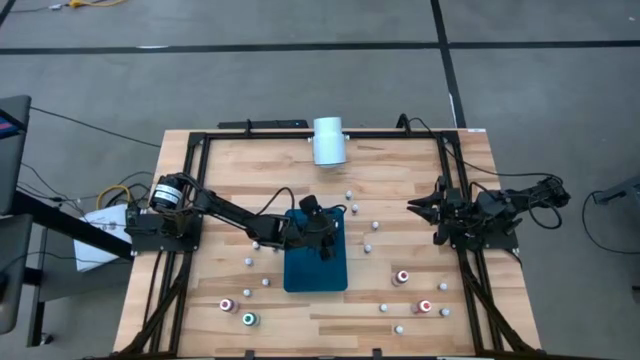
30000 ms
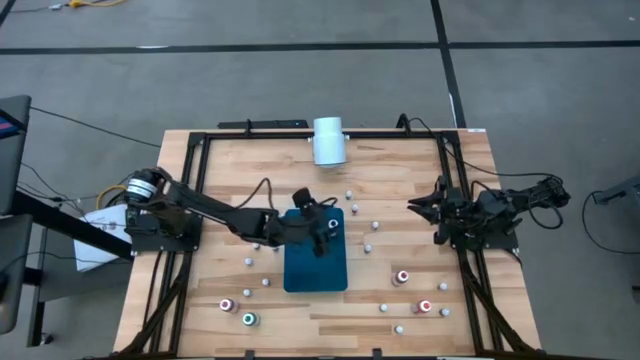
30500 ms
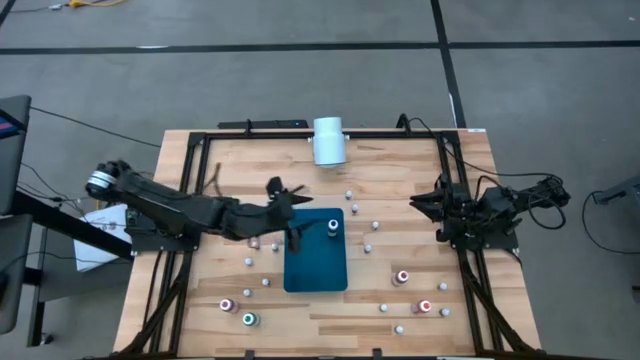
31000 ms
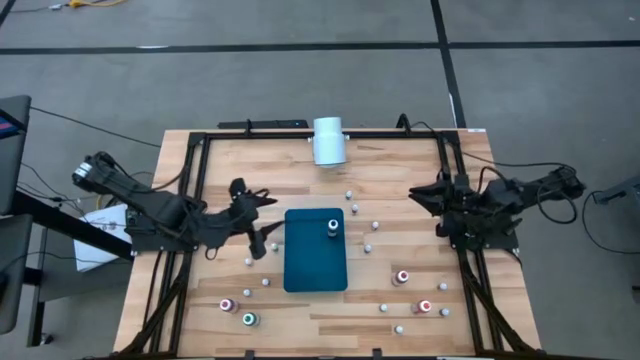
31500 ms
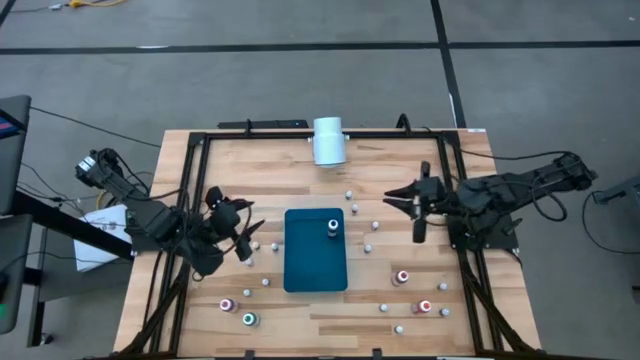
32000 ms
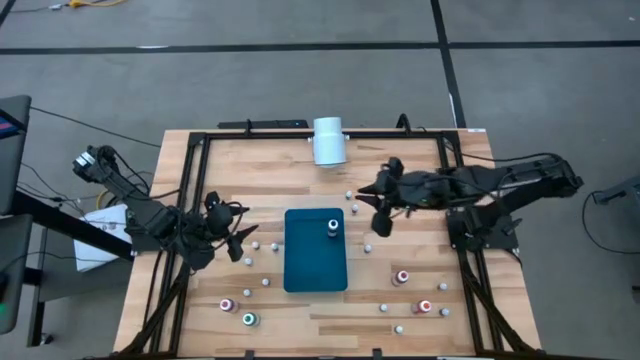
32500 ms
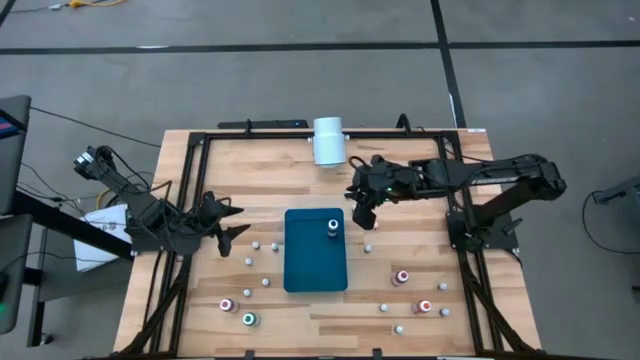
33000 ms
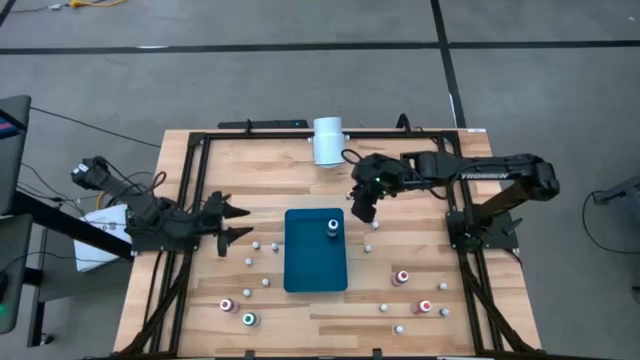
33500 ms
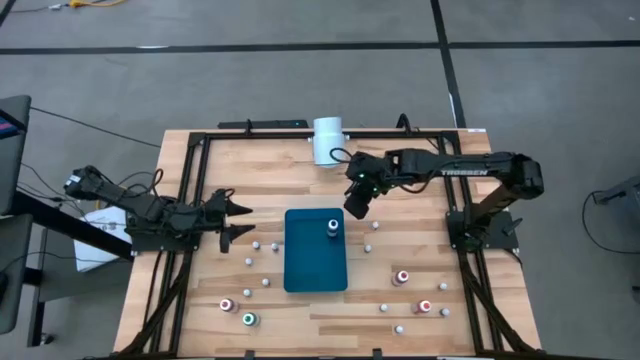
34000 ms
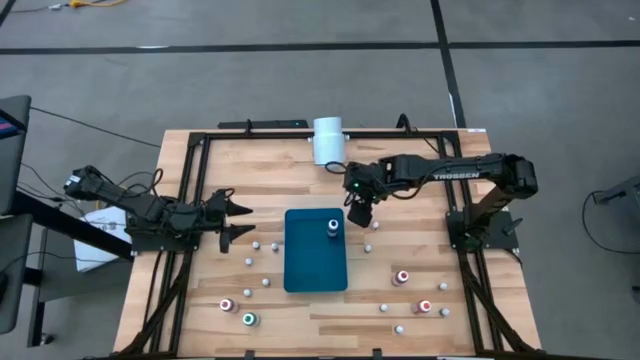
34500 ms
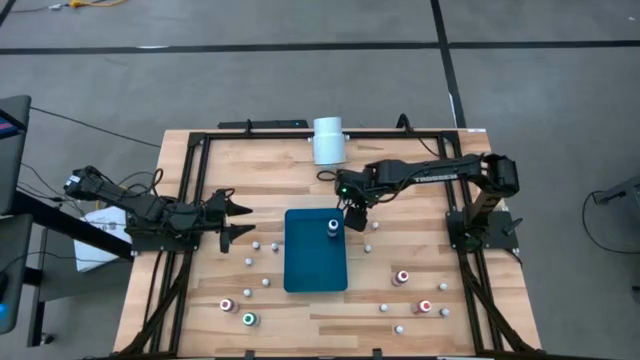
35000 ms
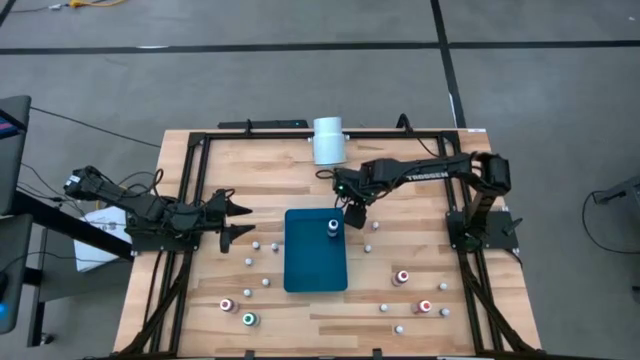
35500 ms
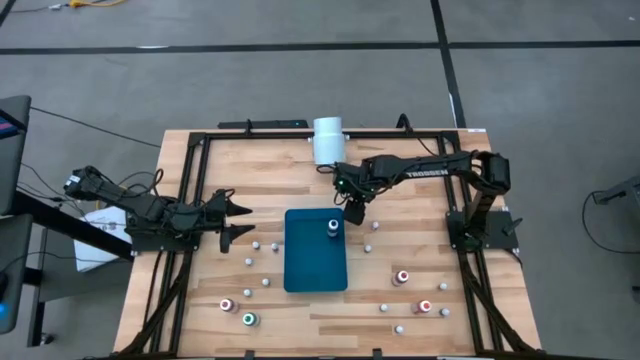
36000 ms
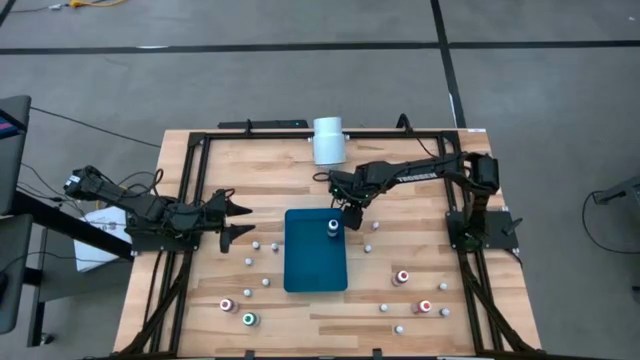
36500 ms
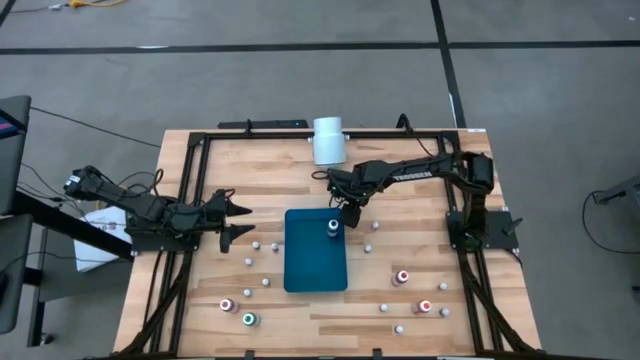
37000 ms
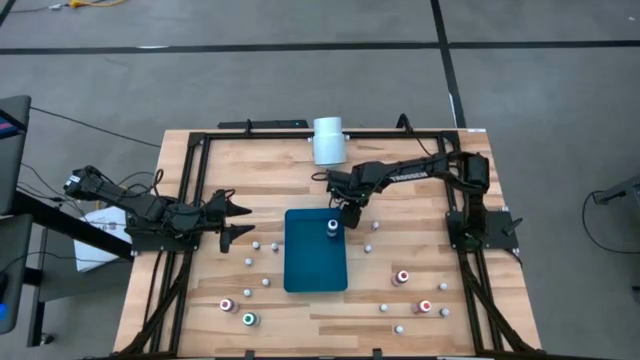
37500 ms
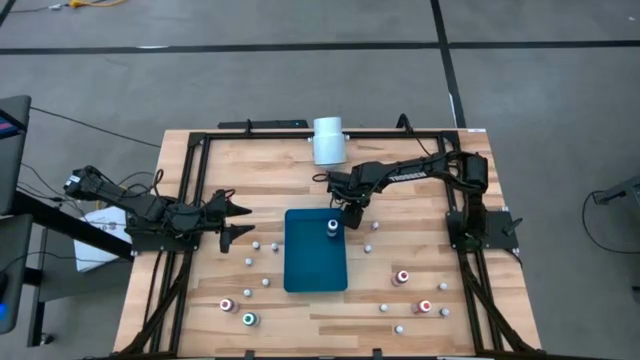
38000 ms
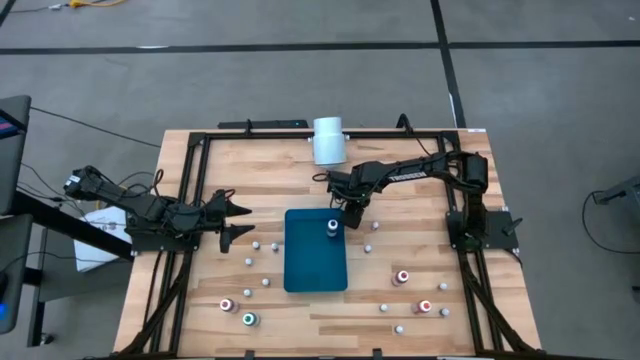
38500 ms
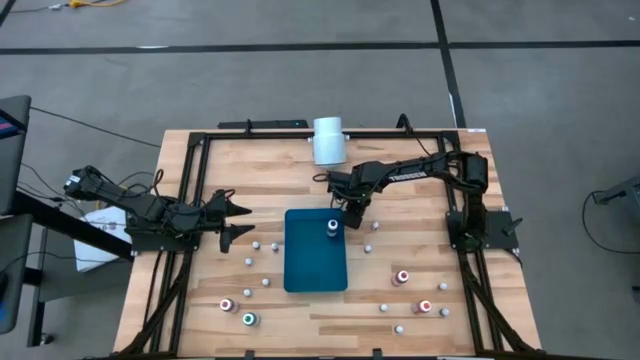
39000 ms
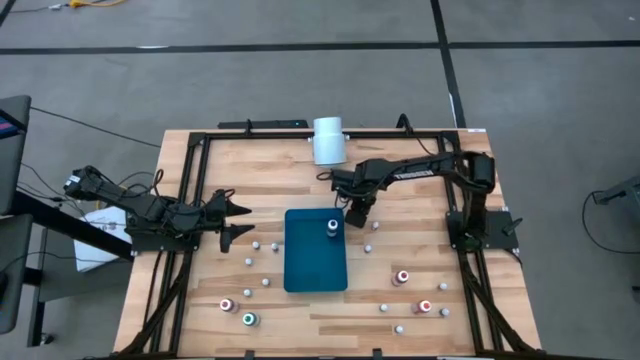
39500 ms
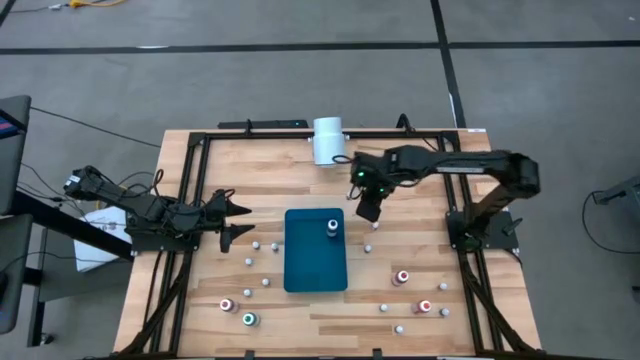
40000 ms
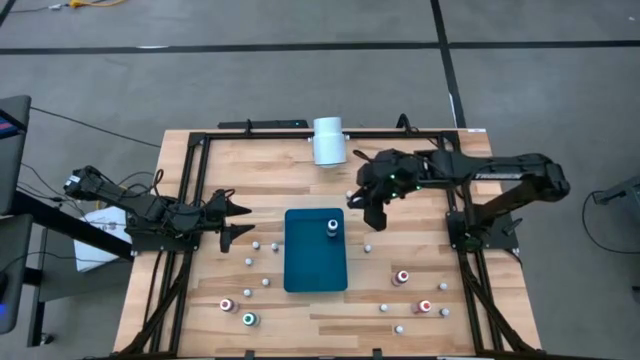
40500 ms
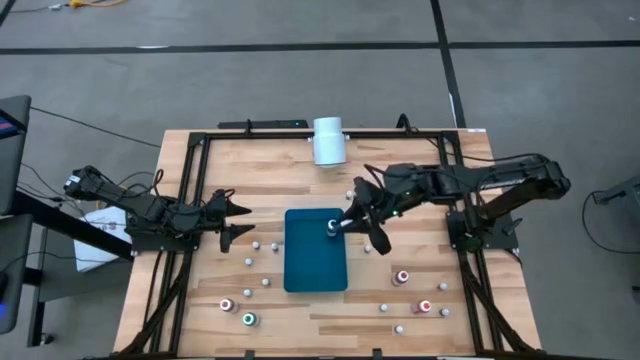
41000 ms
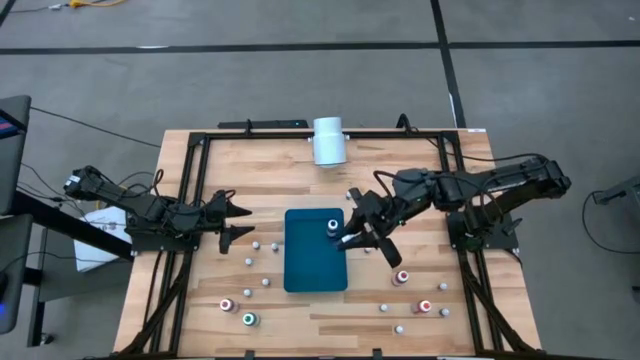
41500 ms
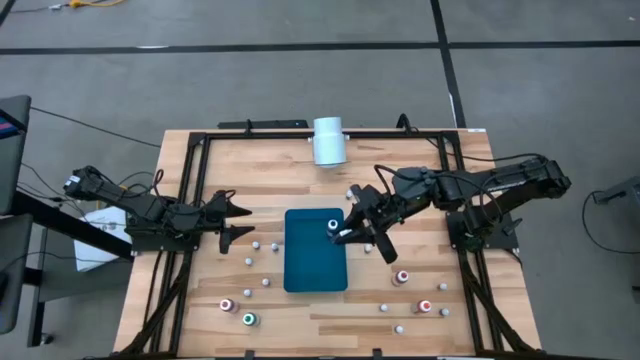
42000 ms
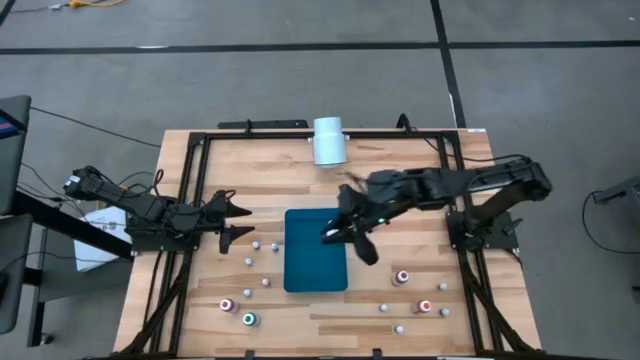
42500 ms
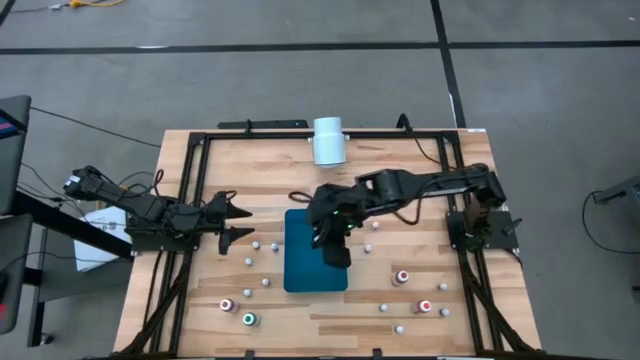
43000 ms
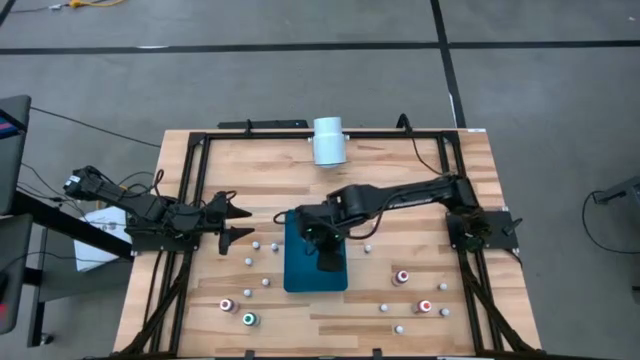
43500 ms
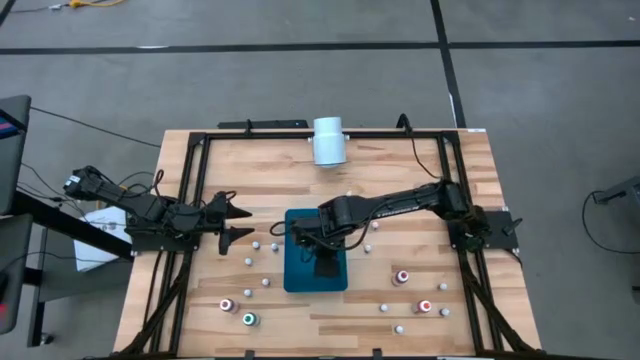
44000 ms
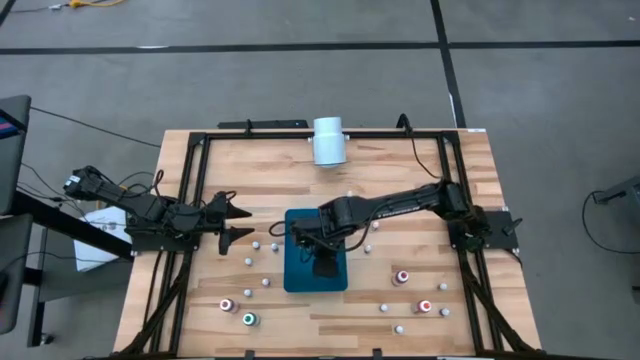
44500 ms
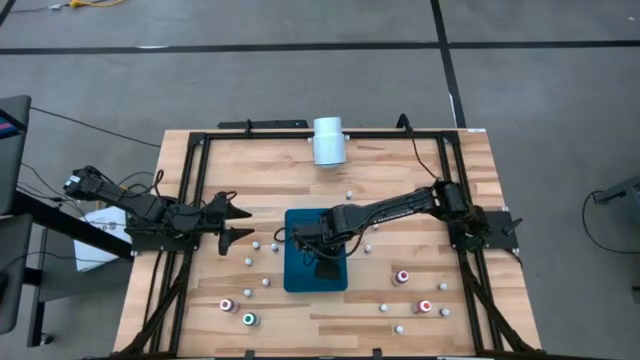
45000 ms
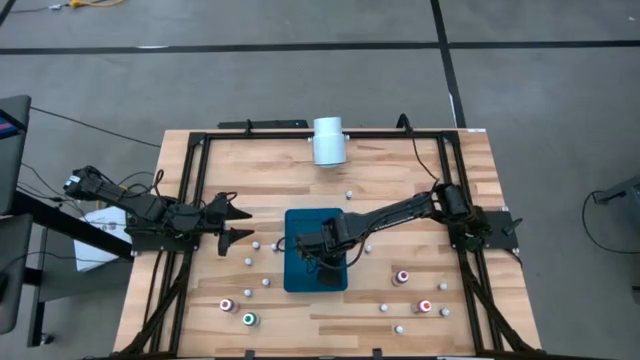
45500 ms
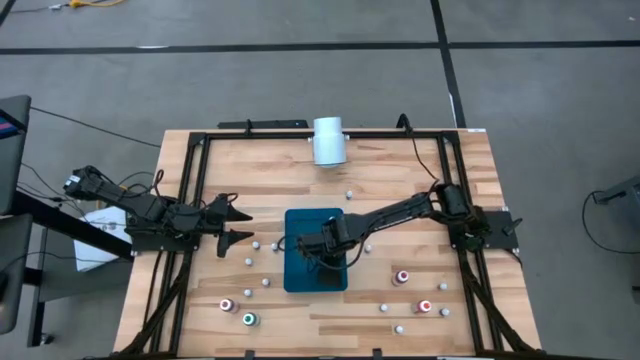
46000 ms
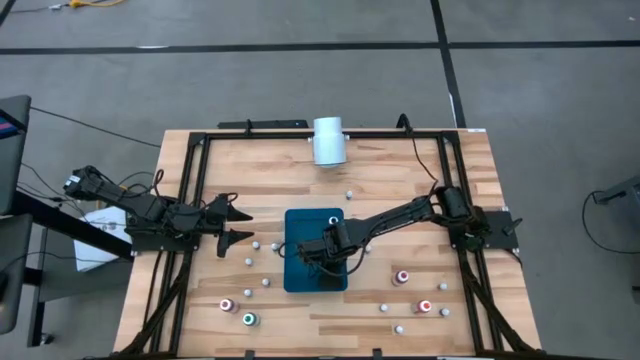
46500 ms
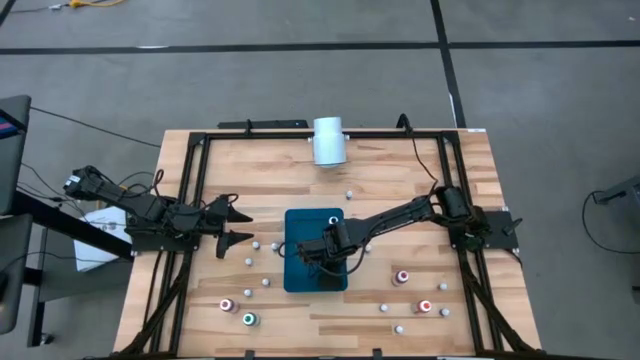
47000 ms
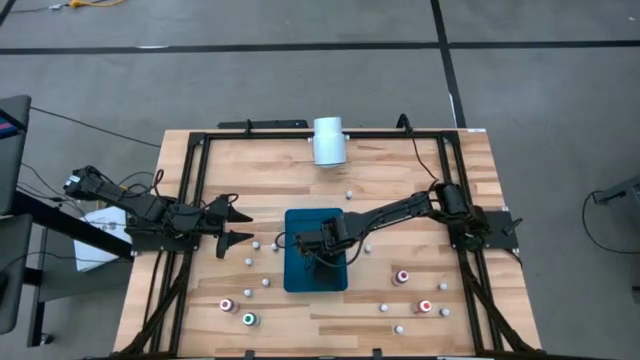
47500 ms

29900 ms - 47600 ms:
Task: Pick & Place food coloring
Put the top small purple food coloring bottle into the blue bin

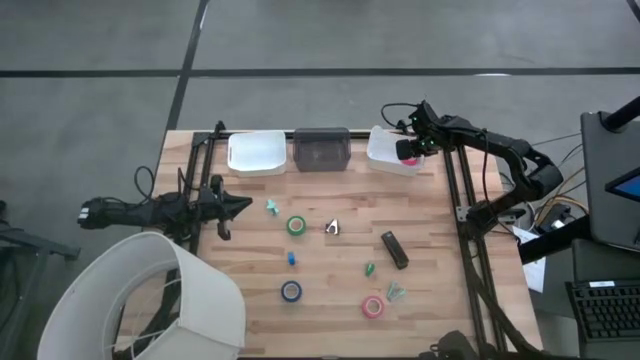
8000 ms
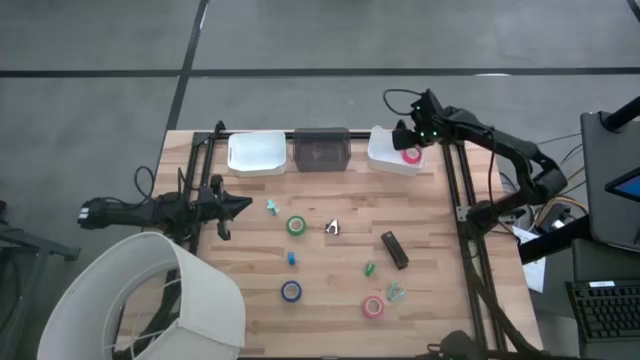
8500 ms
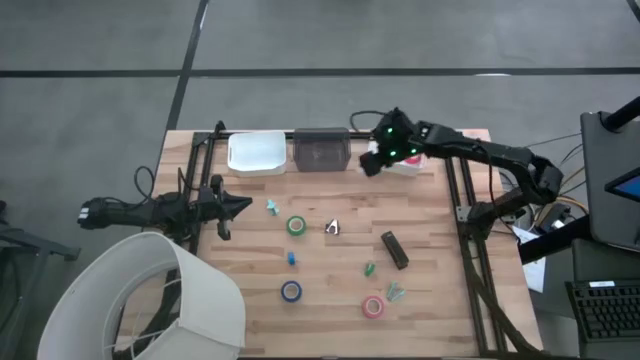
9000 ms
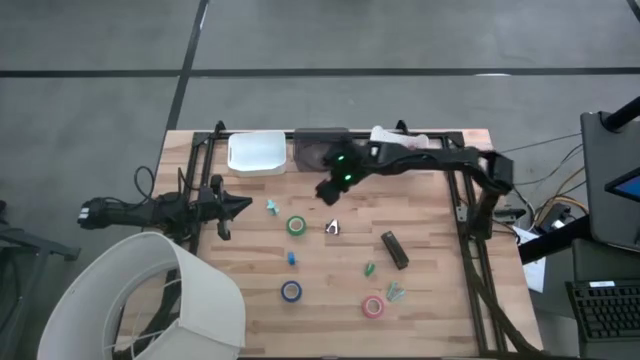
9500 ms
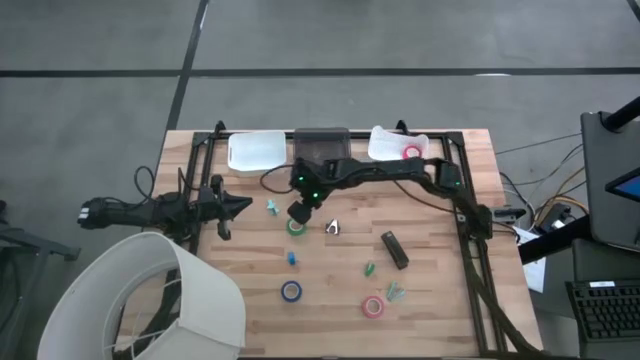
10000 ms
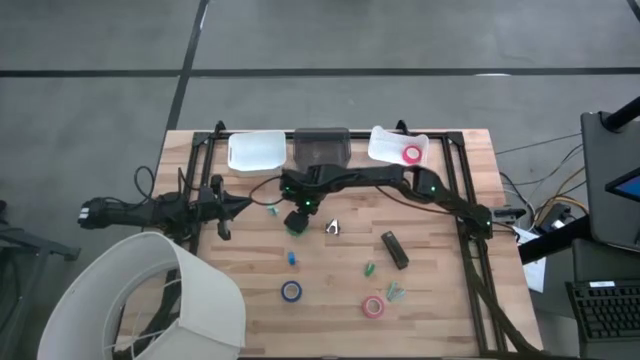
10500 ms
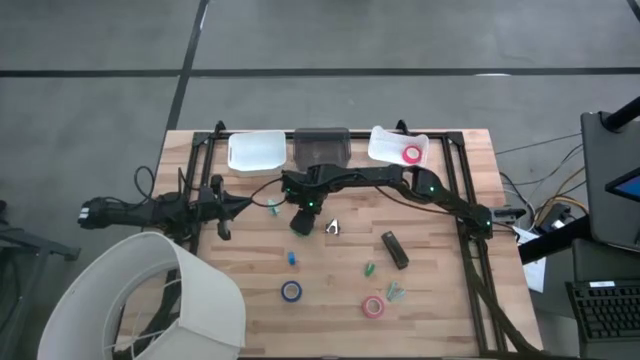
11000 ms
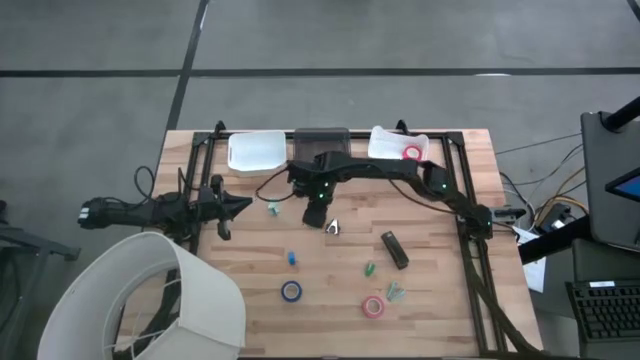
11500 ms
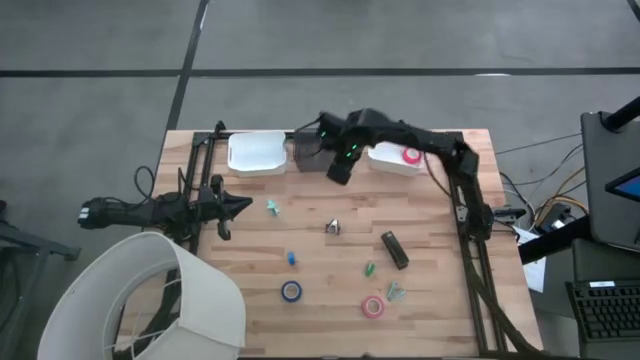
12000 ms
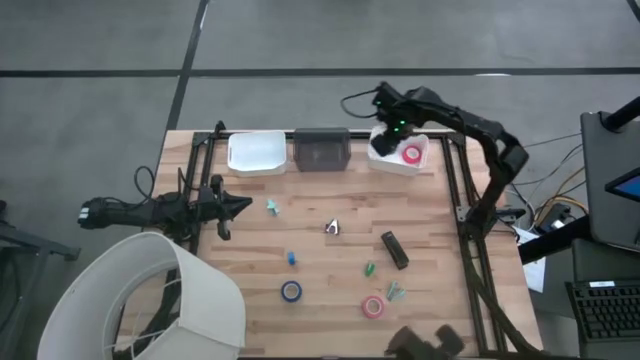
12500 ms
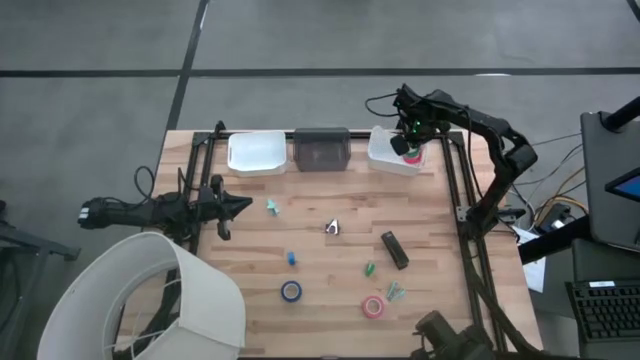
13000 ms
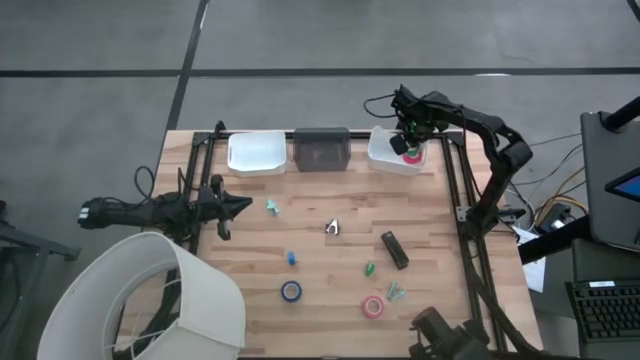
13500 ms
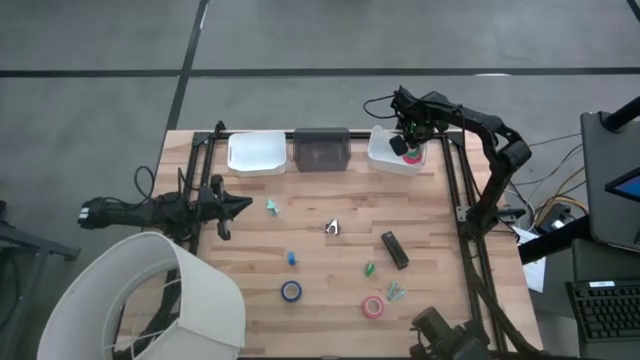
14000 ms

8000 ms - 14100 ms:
Task: Pick and place Stapler, Stapler remover, tape
Put the green tape into the right white bin
